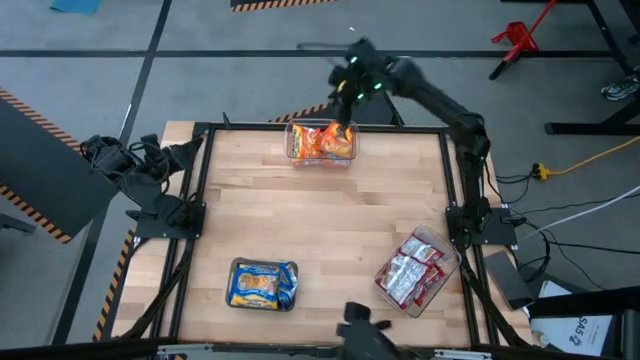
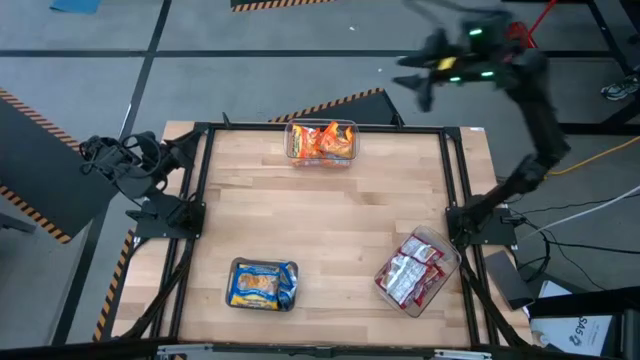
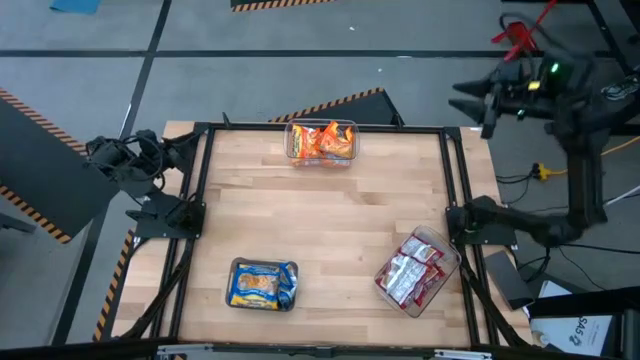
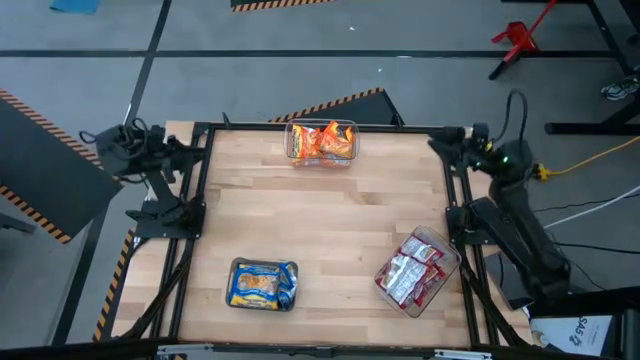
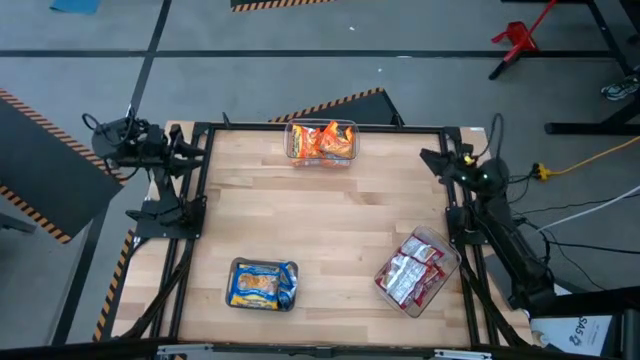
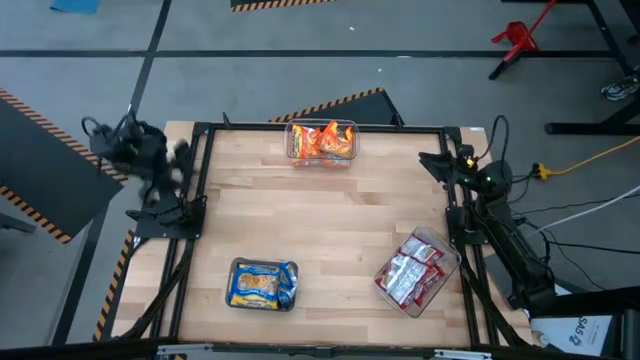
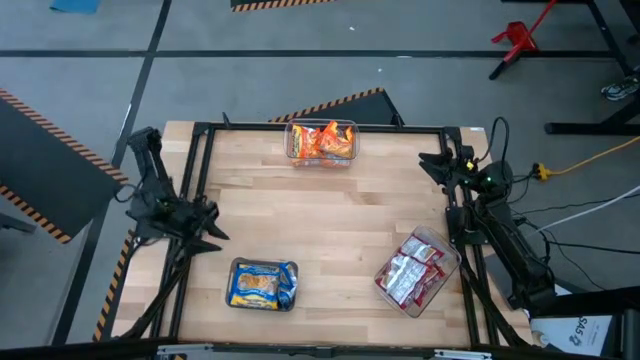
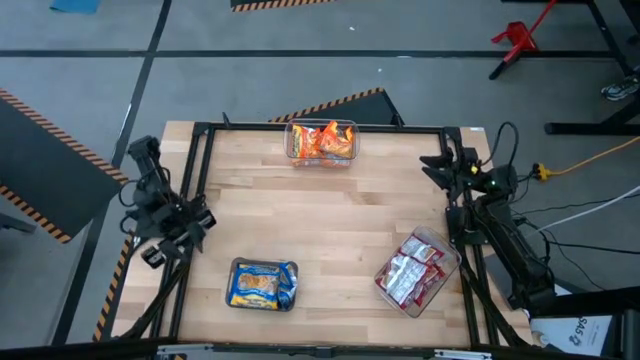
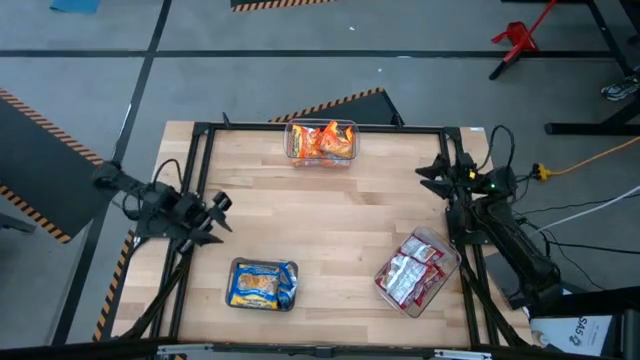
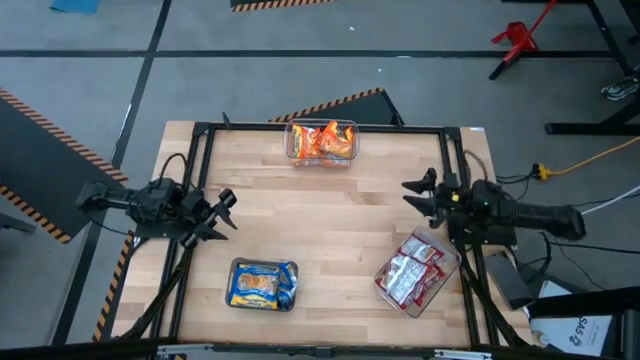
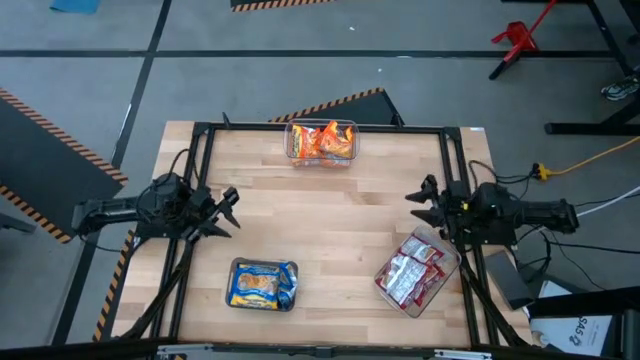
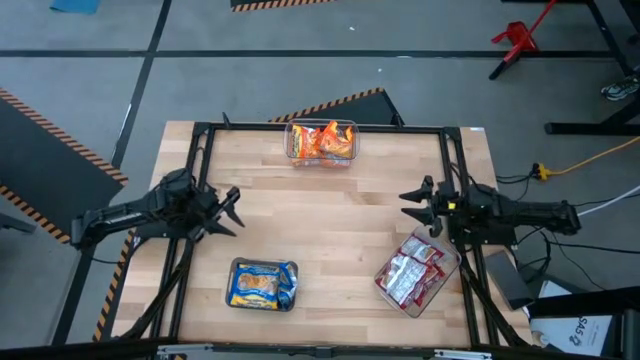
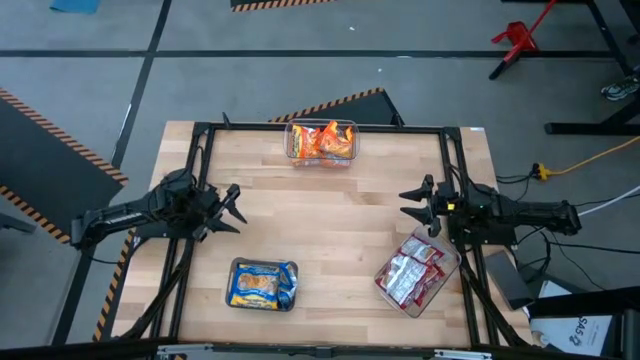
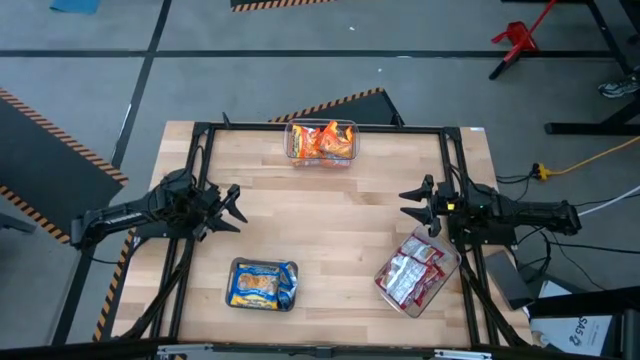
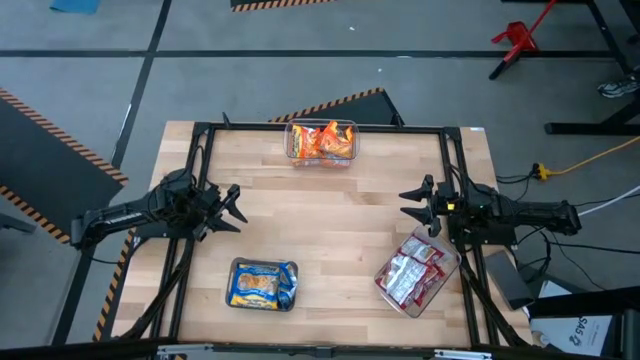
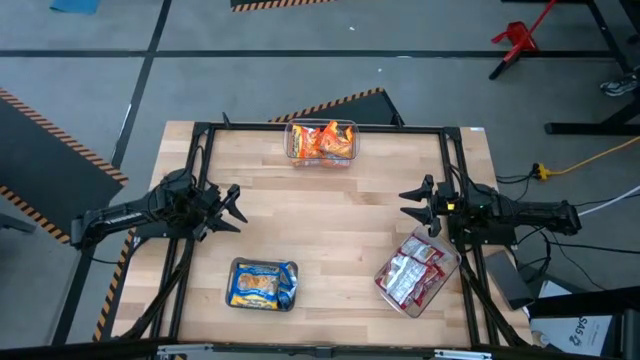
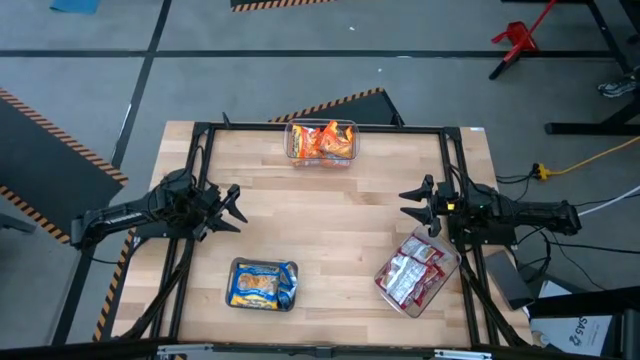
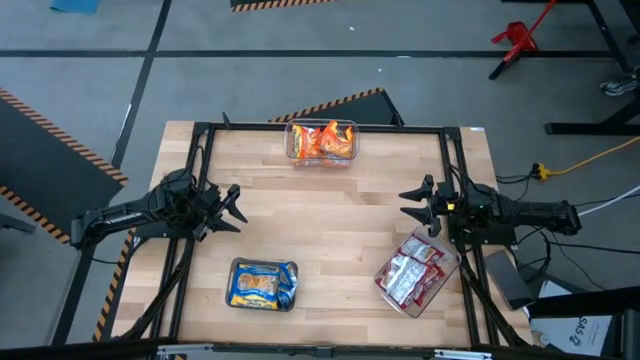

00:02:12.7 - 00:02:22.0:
Task: Sort Maruchan noodles
Return to Home Position

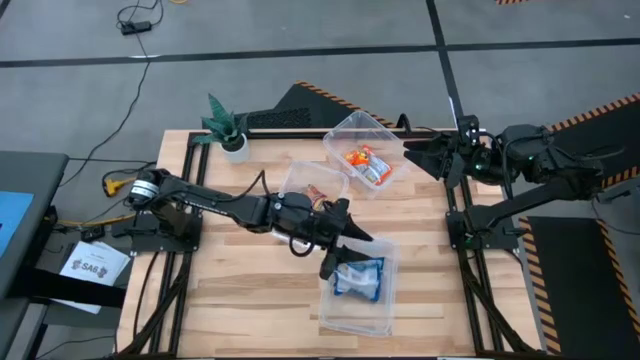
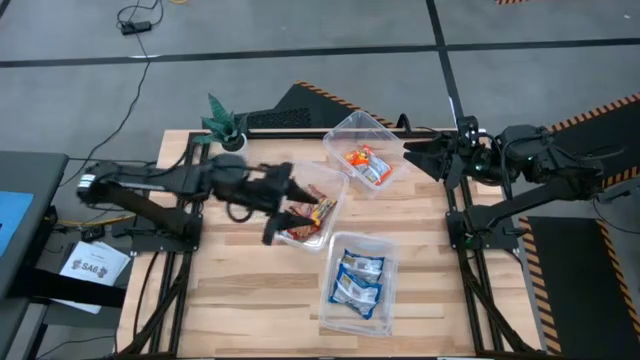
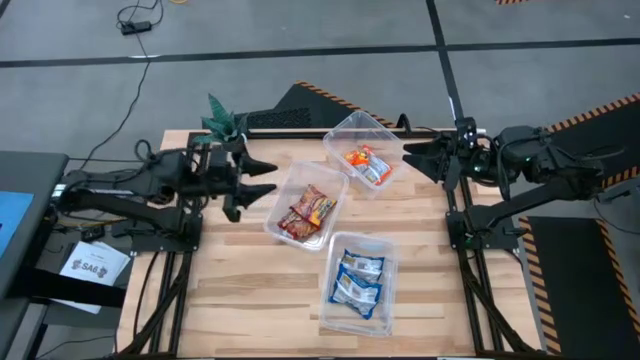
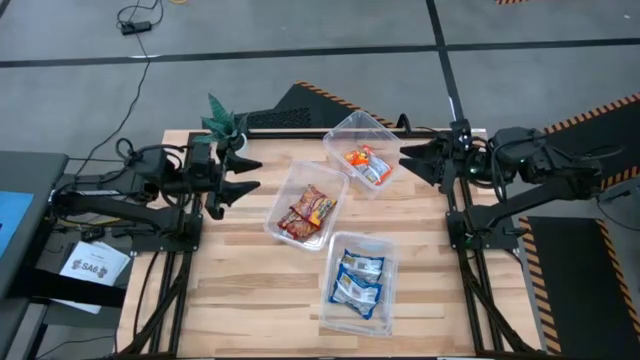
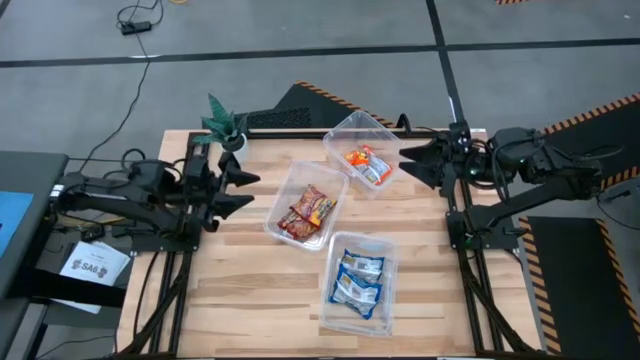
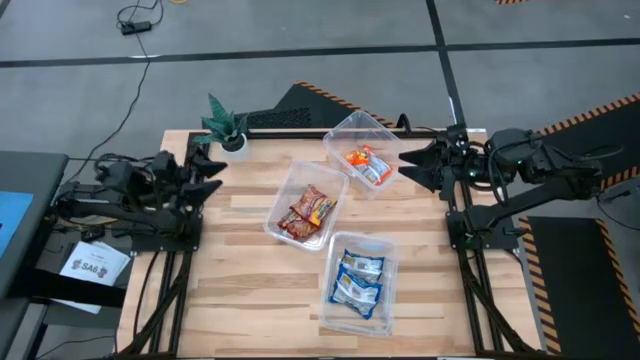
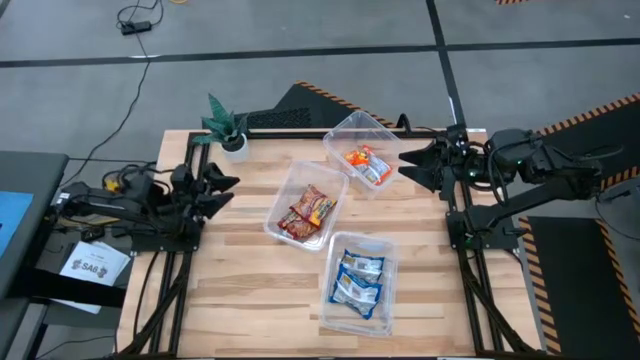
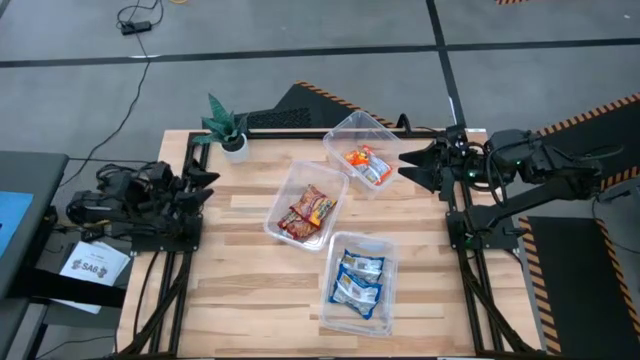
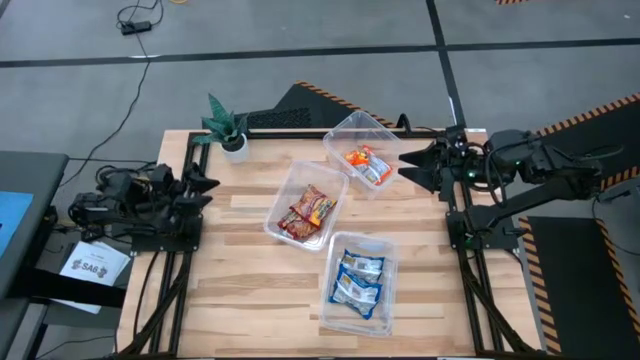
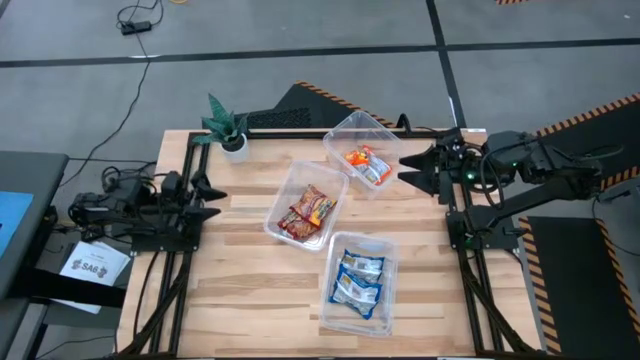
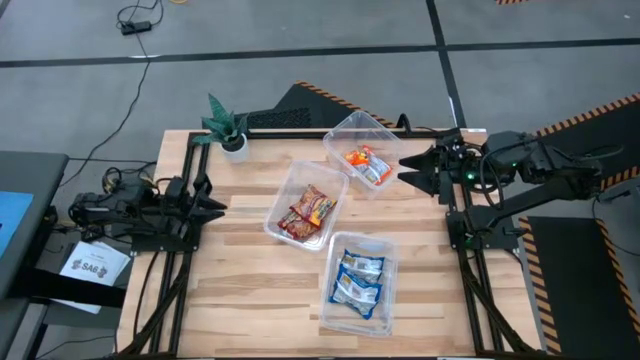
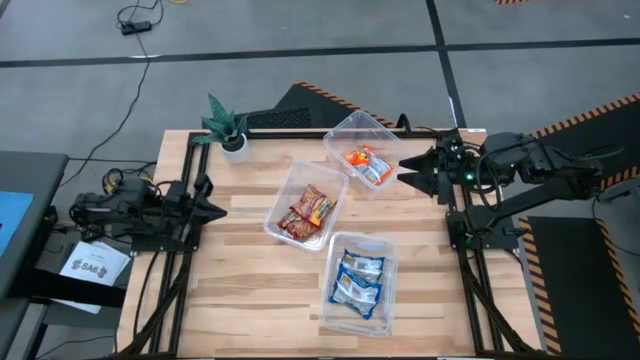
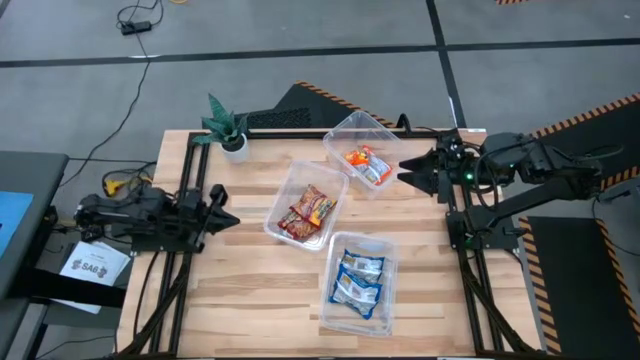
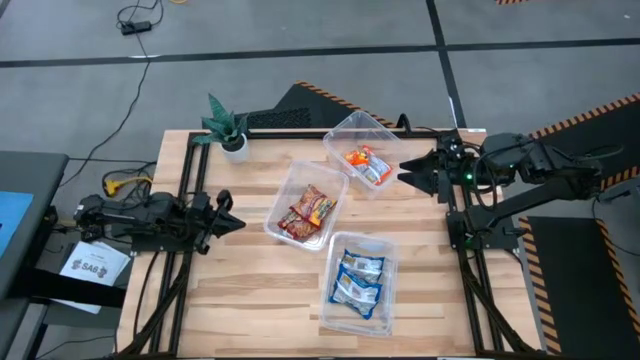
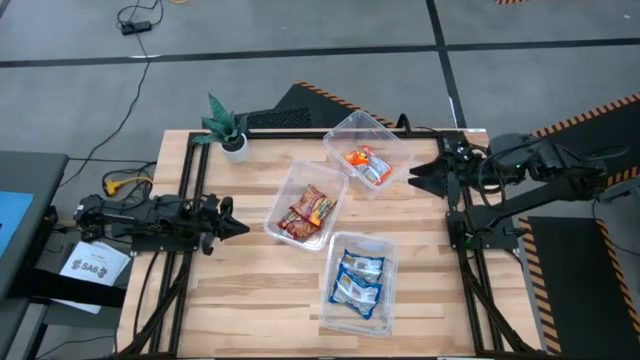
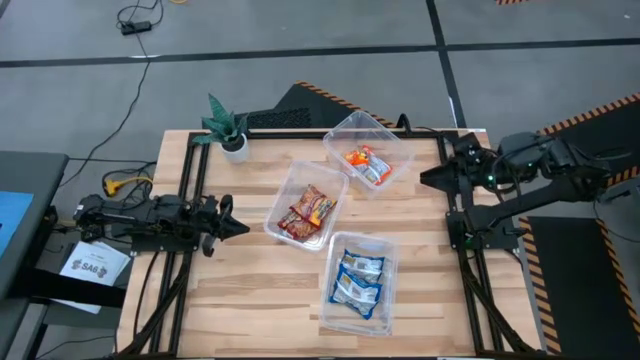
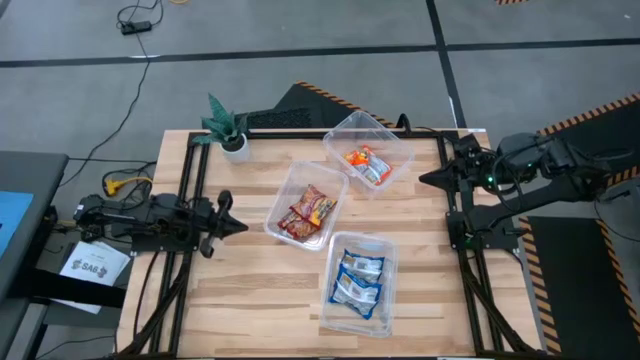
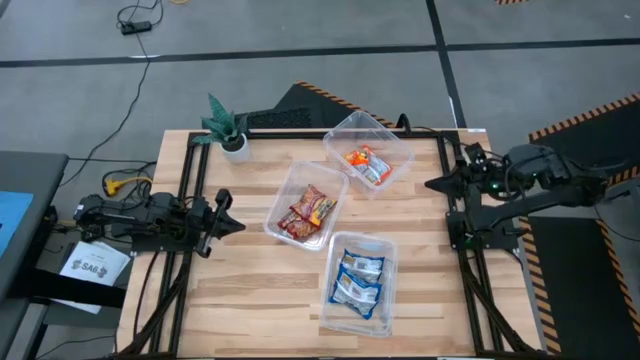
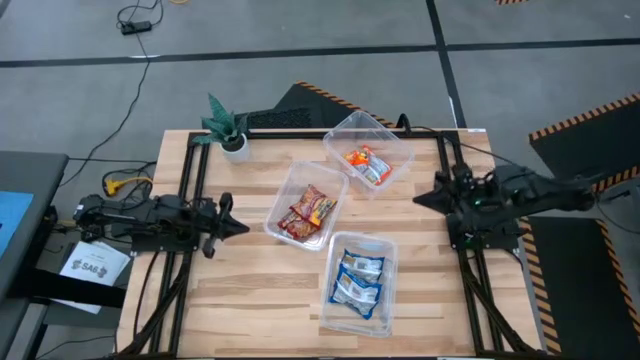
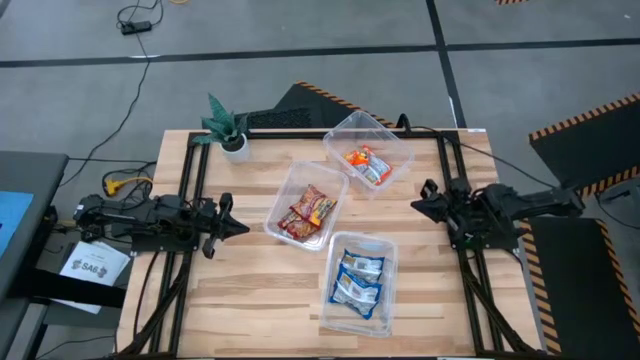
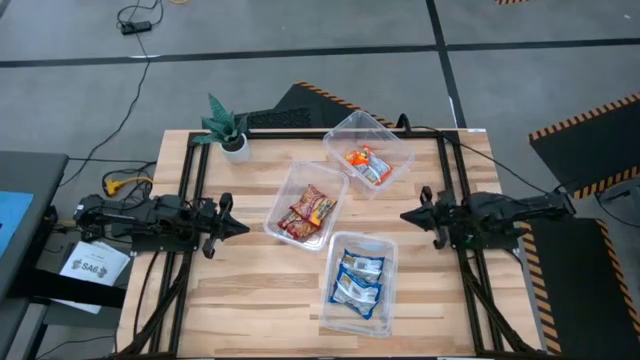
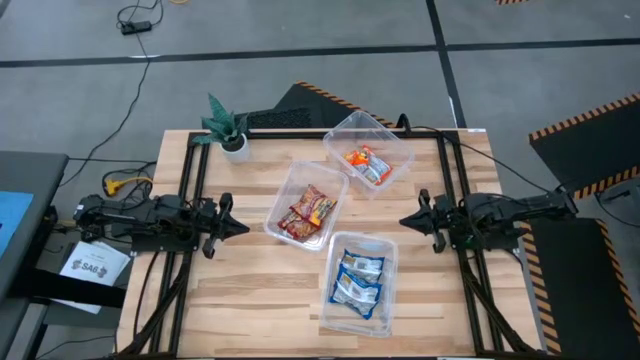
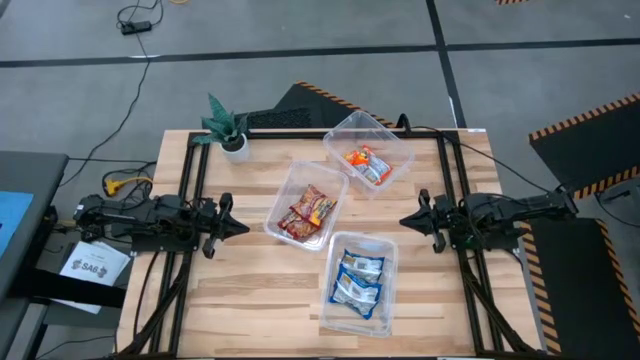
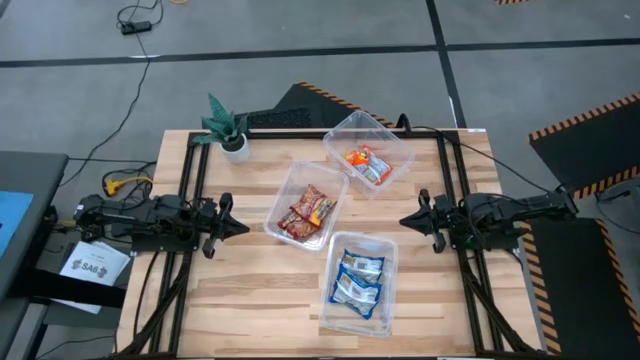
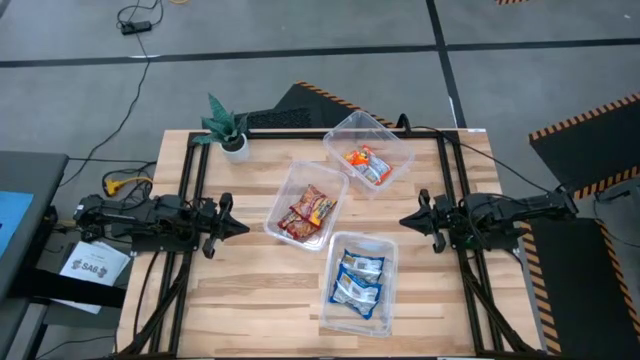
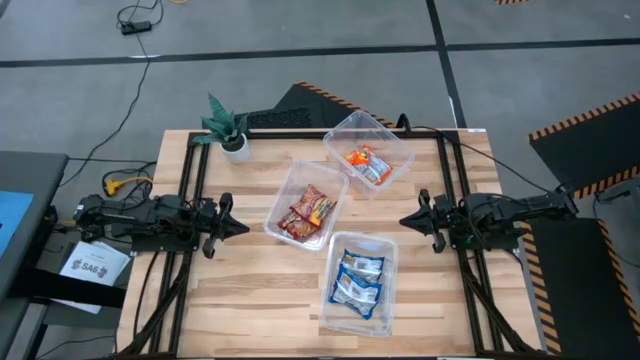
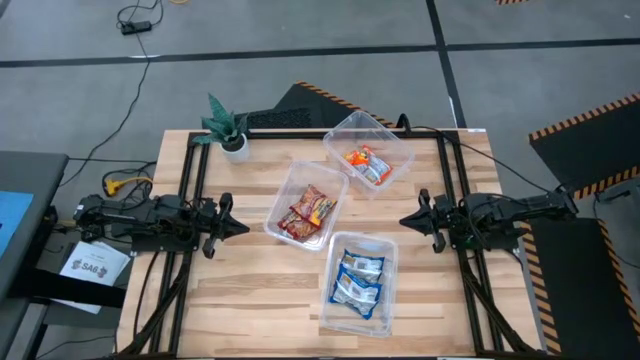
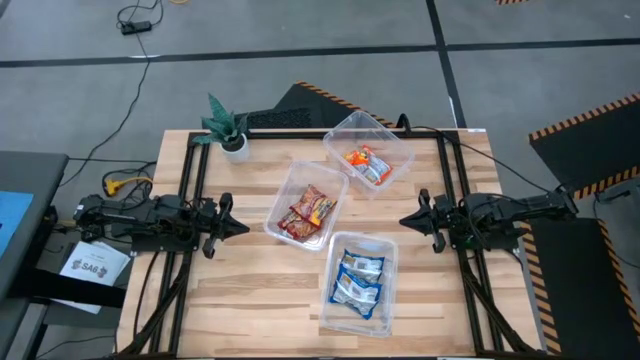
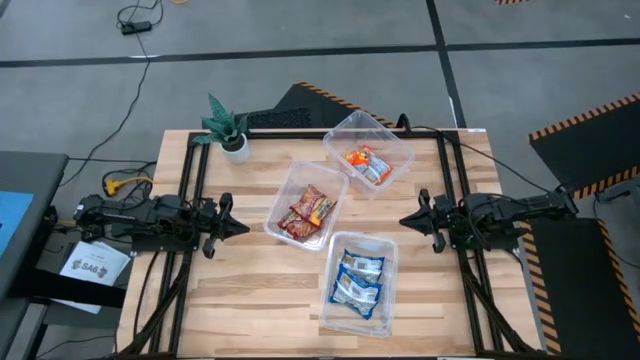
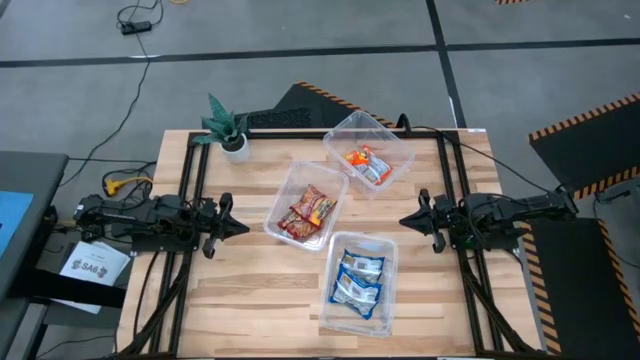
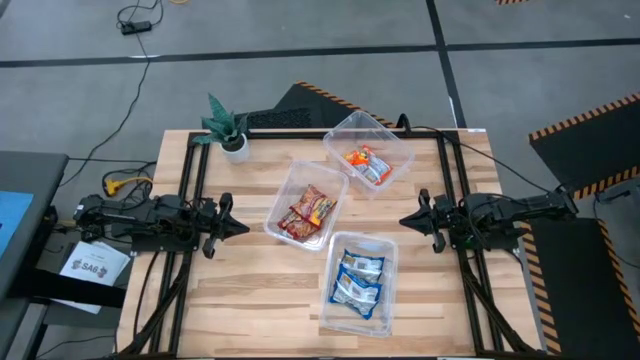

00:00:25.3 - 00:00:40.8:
Task: Sort Maruchan noodles
Return to Home Position
